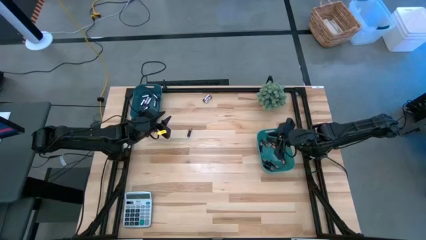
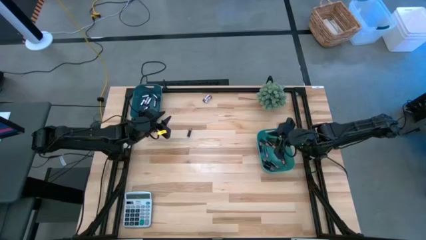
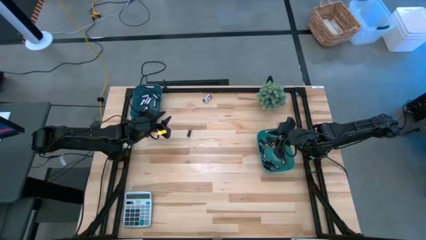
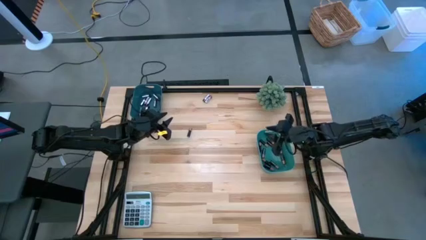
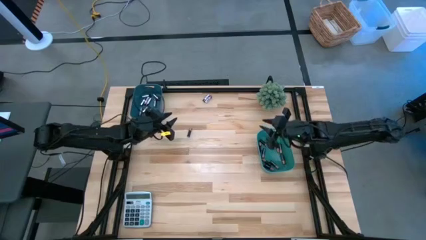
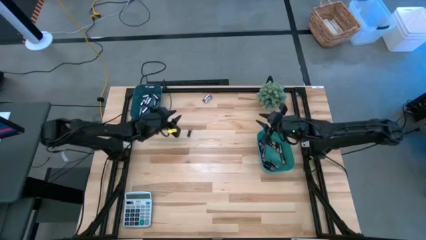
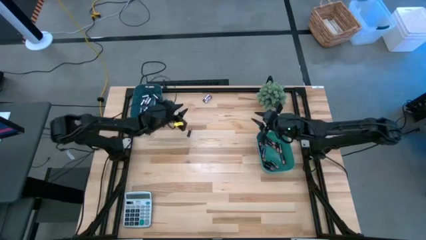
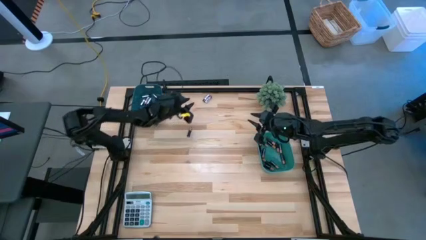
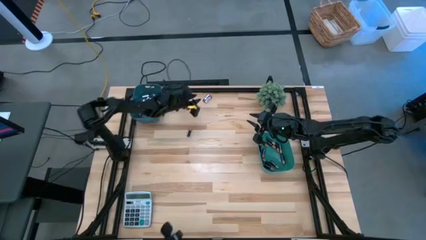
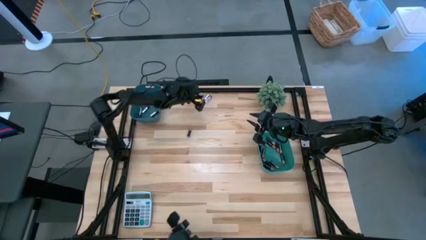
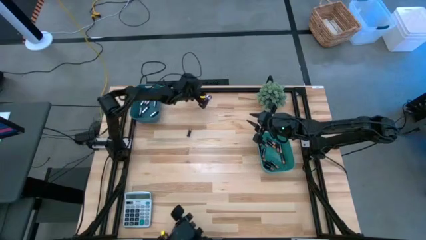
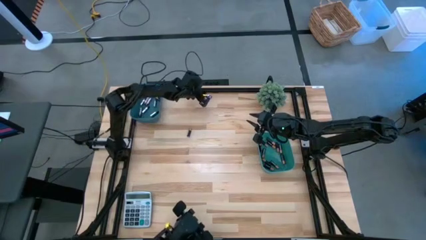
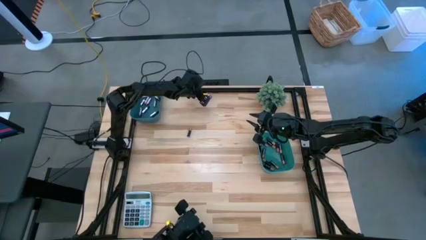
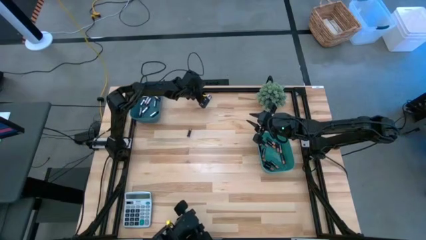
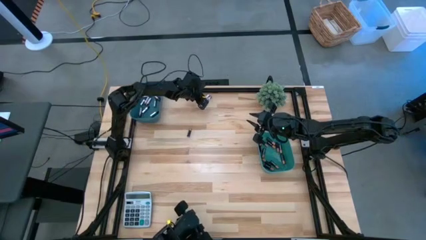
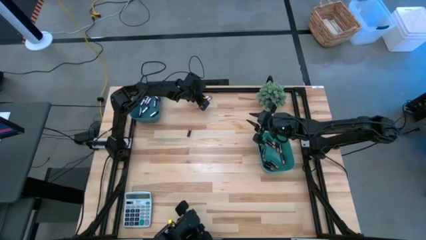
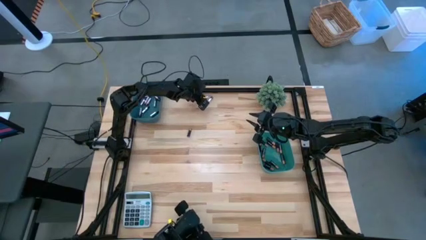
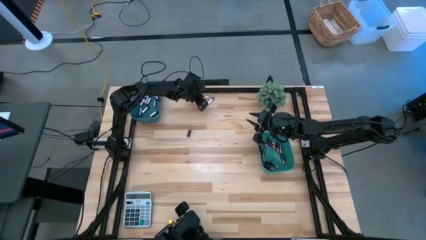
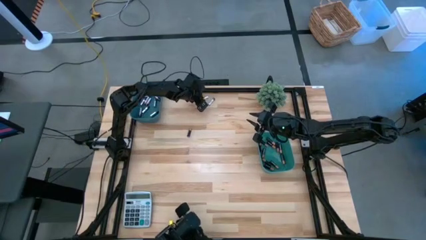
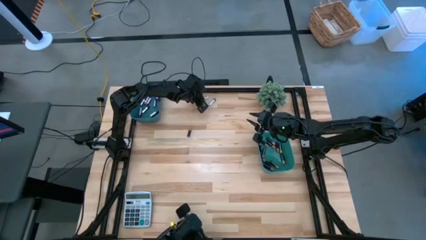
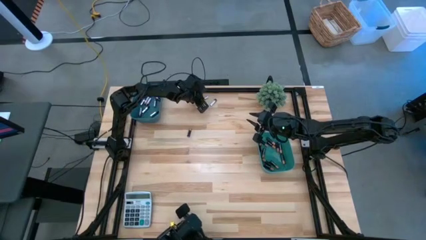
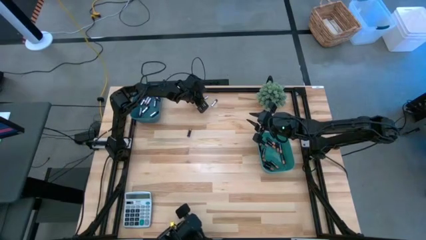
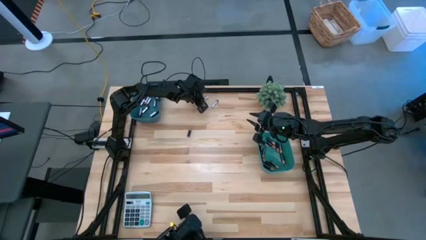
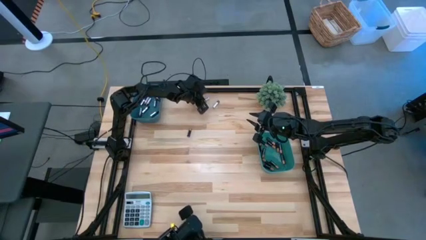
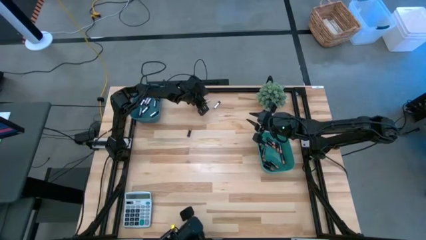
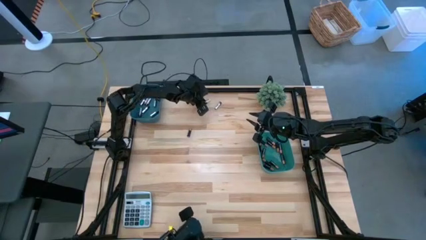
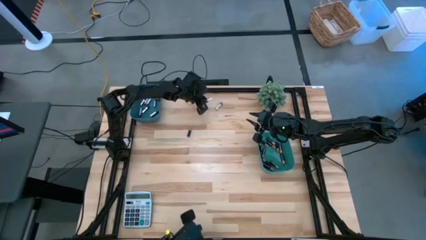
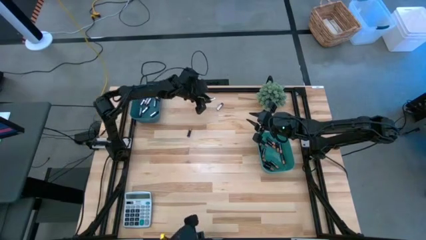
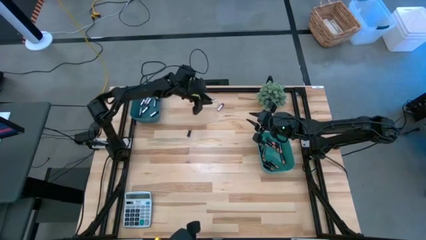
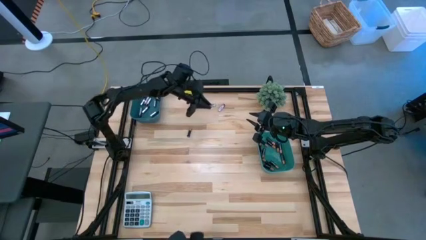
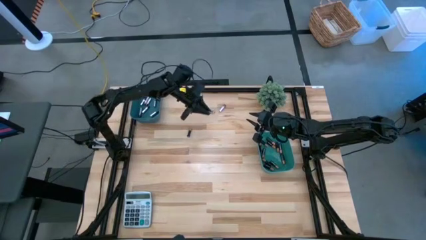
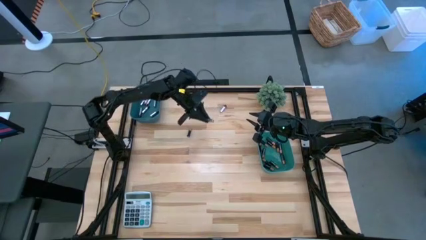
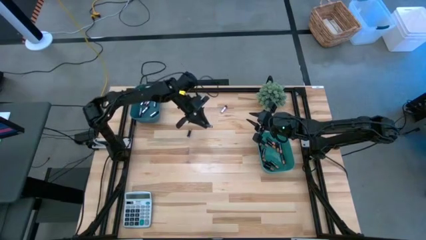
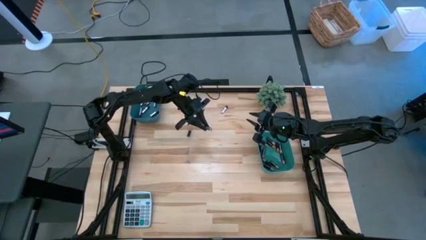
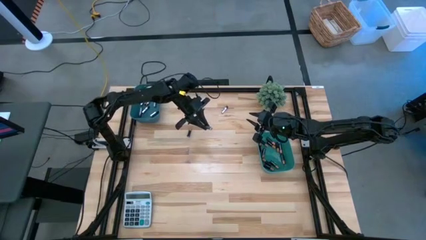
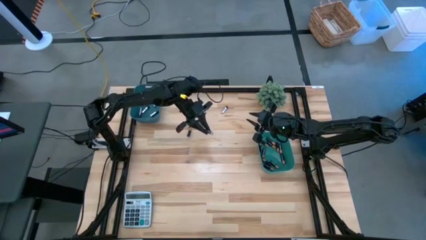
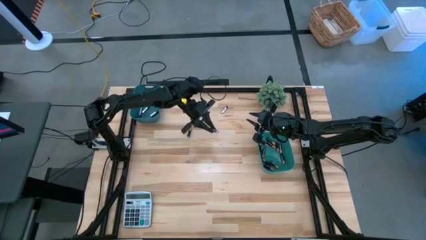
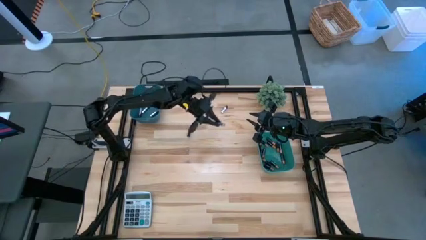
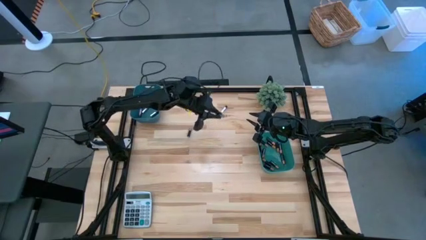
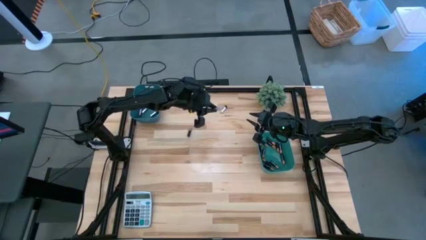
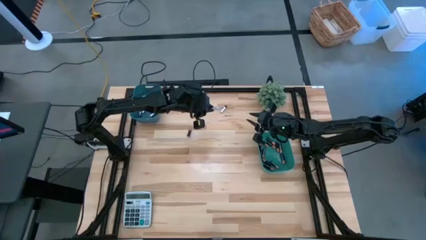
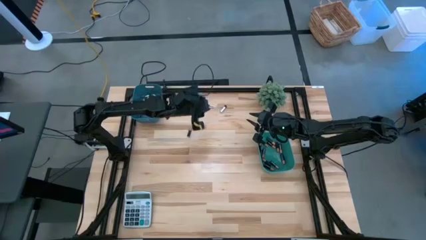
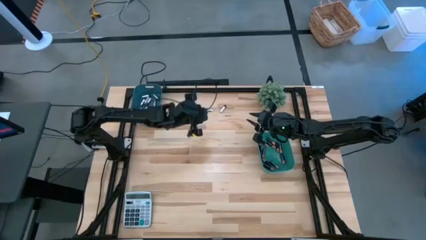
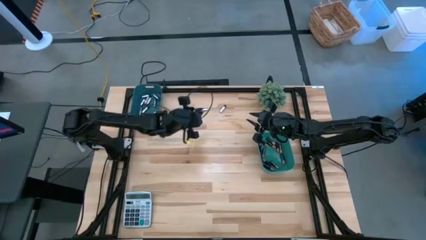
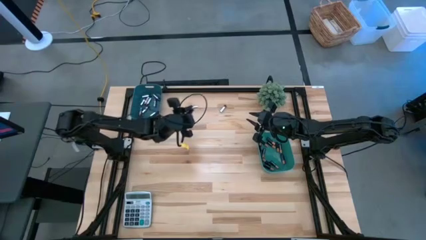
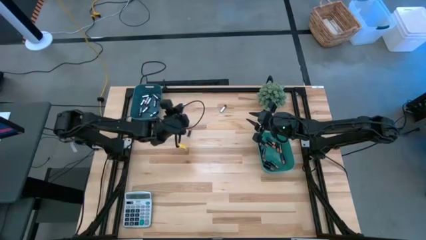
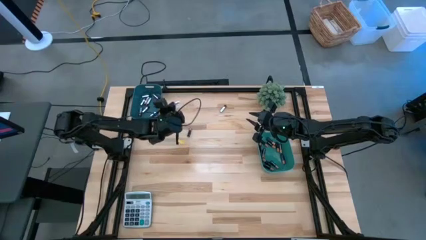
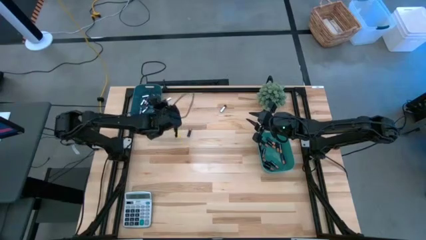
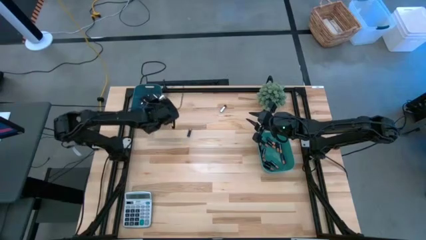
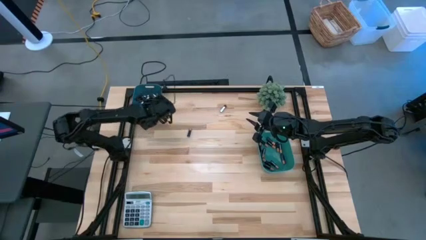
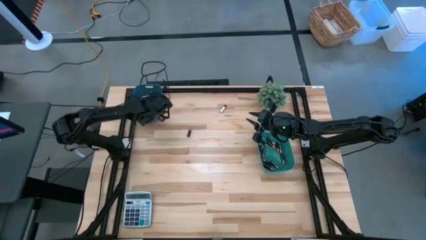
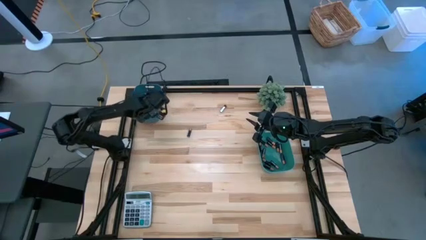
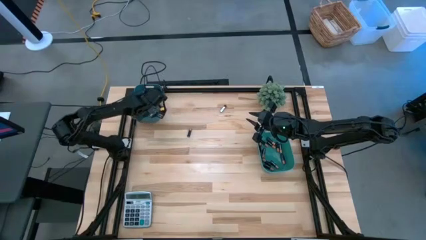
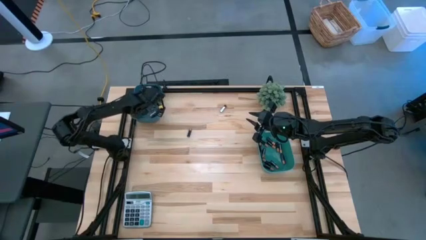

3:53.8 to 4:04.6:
Task: Sort batteries
Put the black-silver battery into the blue bin
